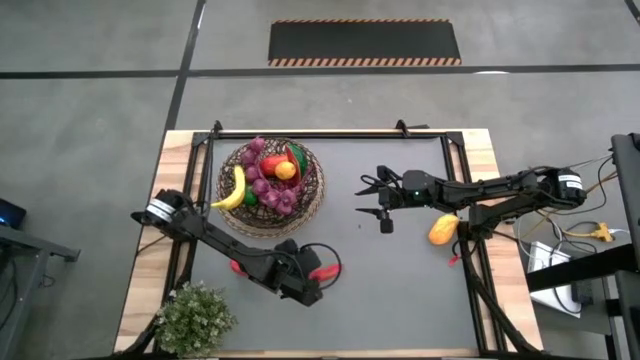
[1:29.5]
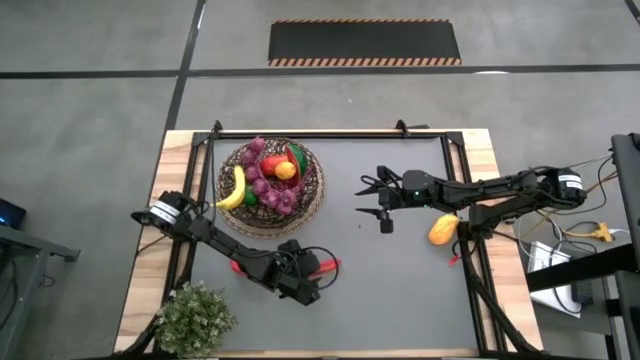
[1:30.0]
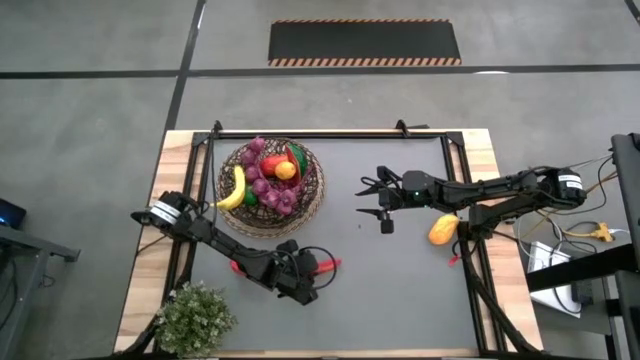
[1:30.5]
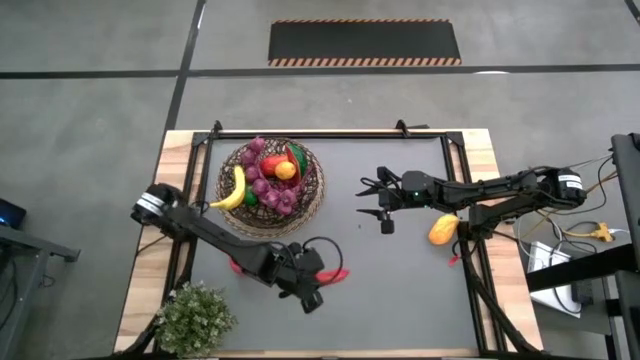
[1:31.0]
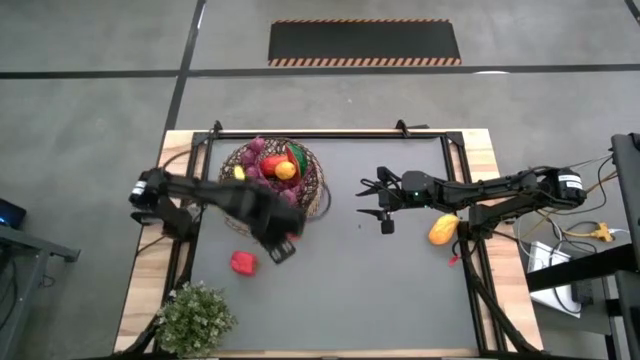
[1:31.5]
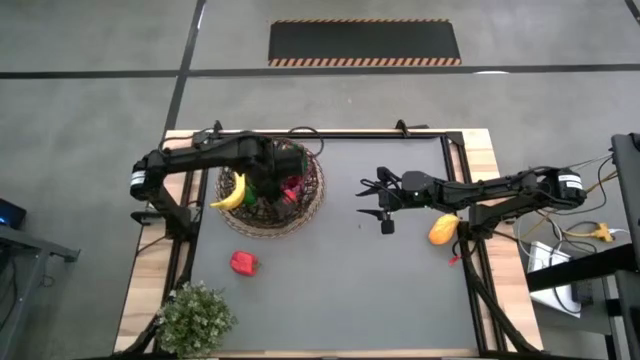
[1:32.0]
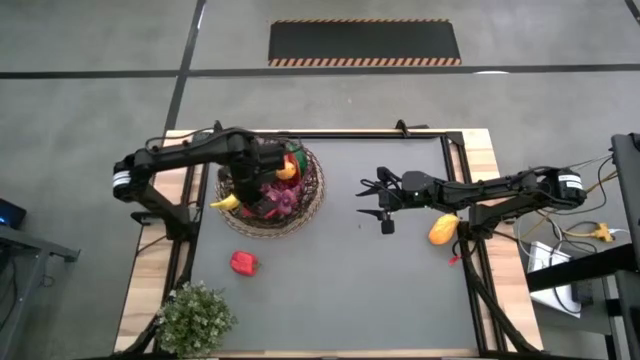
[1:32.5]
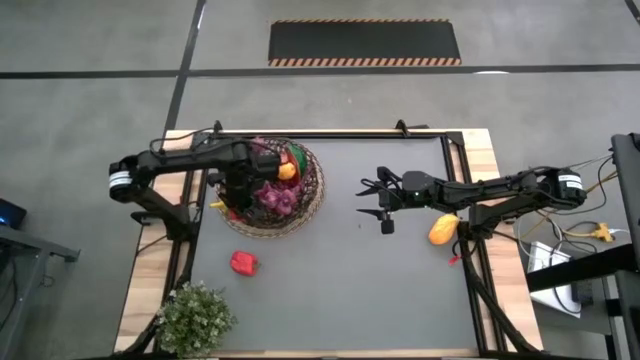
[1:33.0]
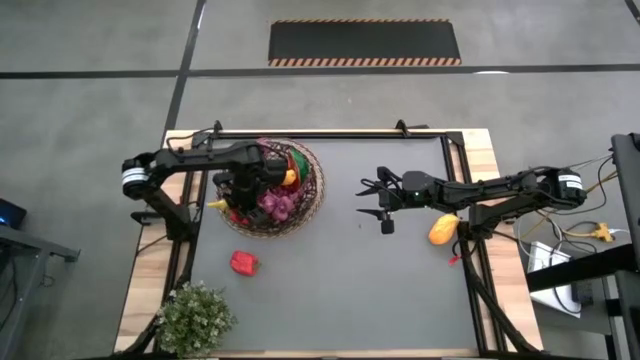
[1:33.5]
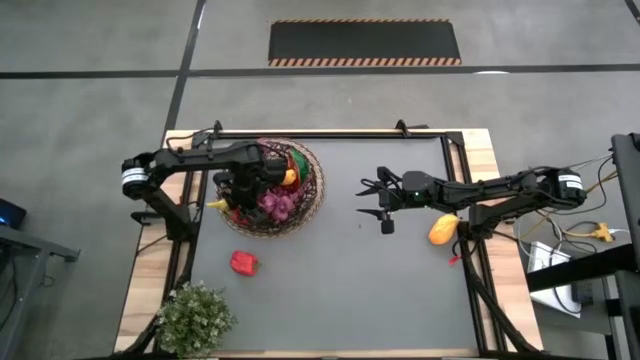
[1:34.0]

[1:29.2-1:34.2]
Task: Build produce basket
Put the red chili pepper into the wire basket

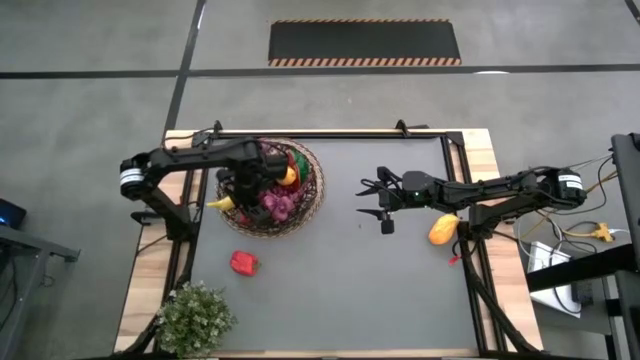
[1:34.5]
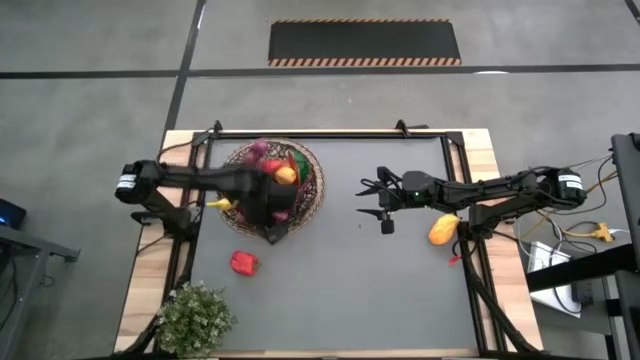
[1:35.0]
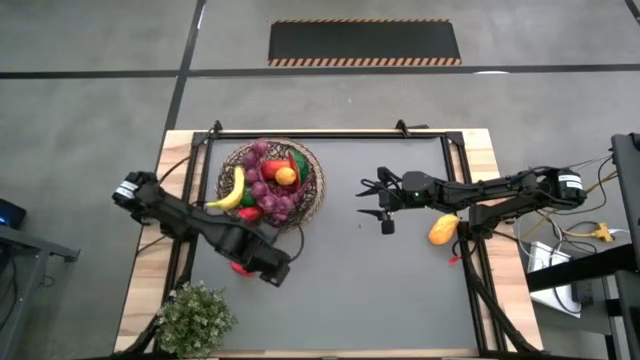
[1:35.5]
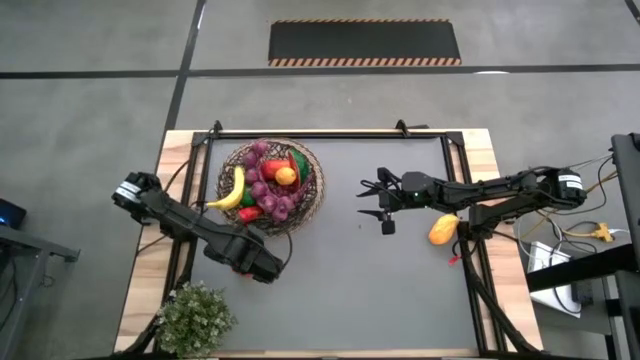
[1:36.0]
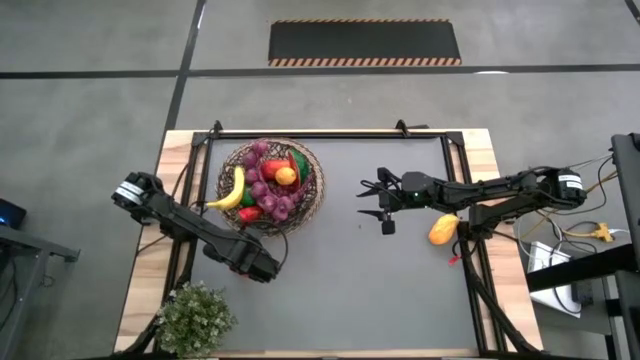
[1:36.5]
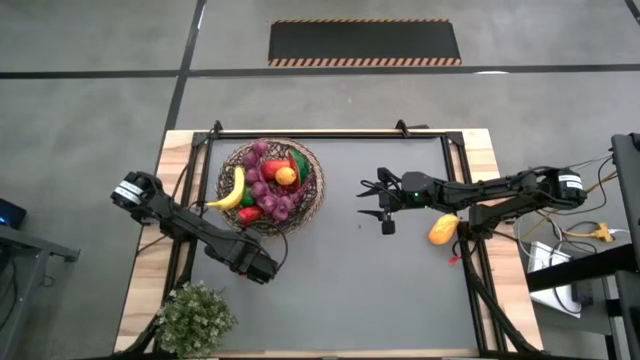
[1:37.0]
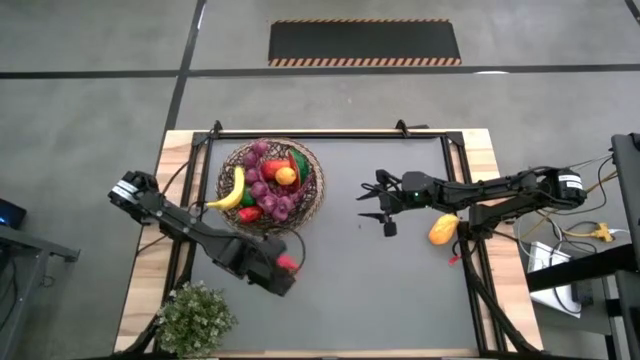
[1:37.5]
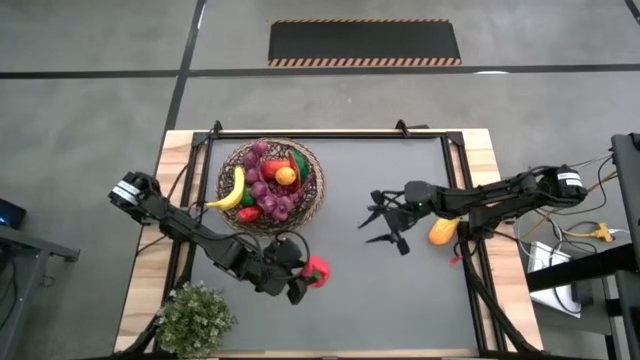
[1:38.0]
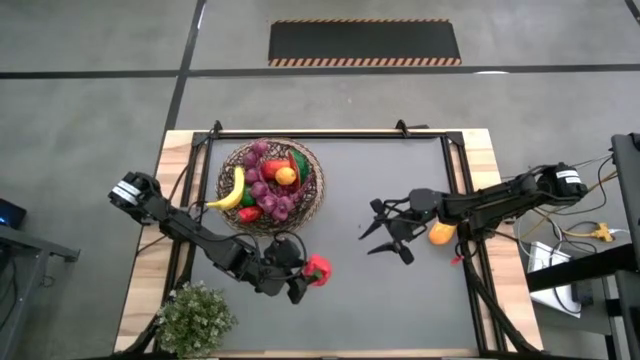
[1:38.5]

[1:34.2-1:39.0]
Put the bell pepper into the wire basket

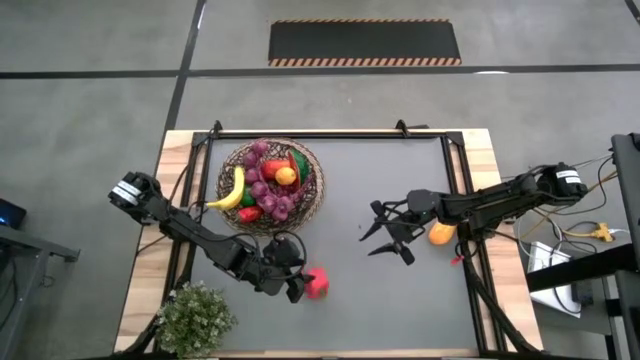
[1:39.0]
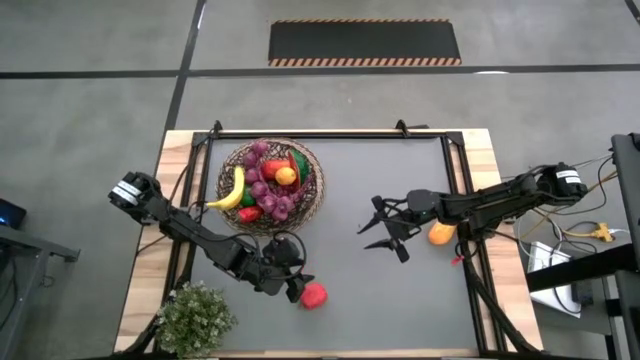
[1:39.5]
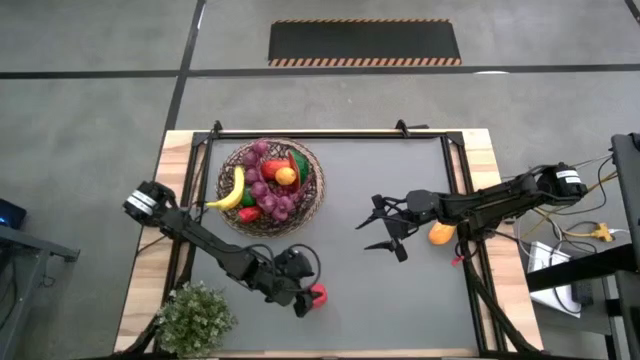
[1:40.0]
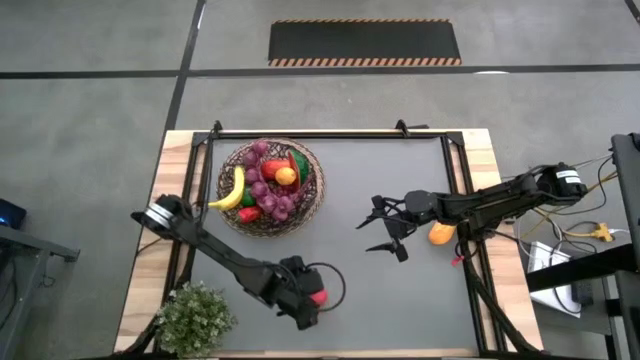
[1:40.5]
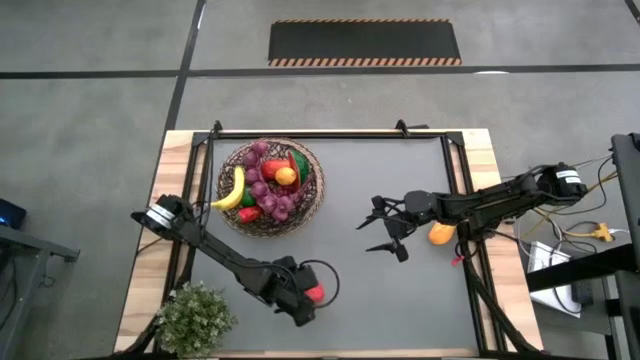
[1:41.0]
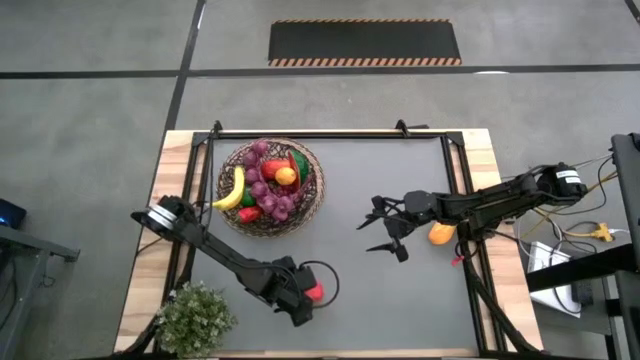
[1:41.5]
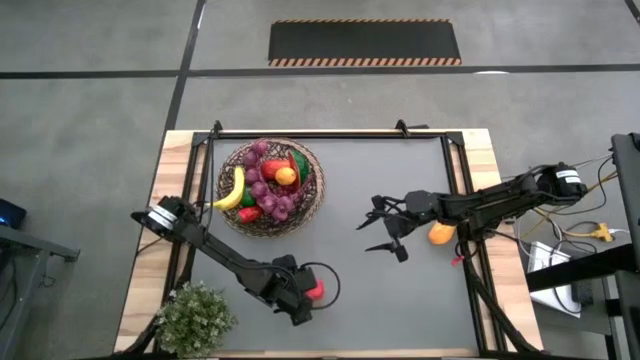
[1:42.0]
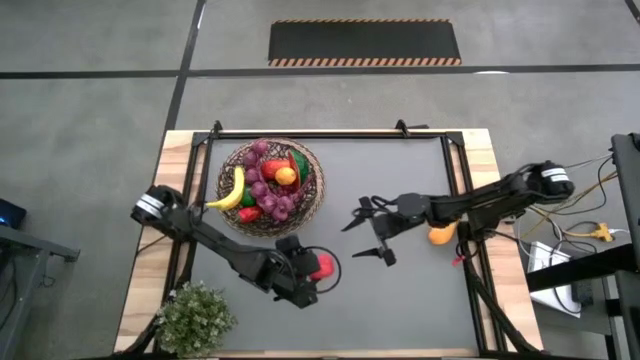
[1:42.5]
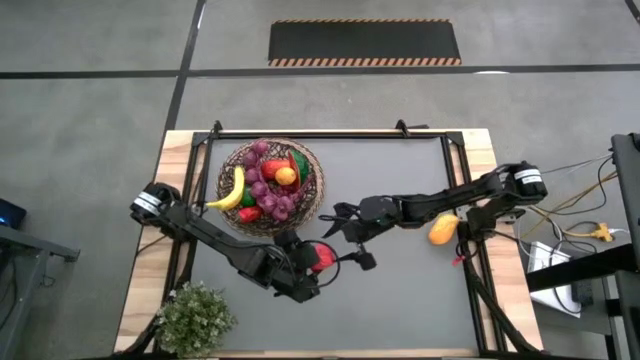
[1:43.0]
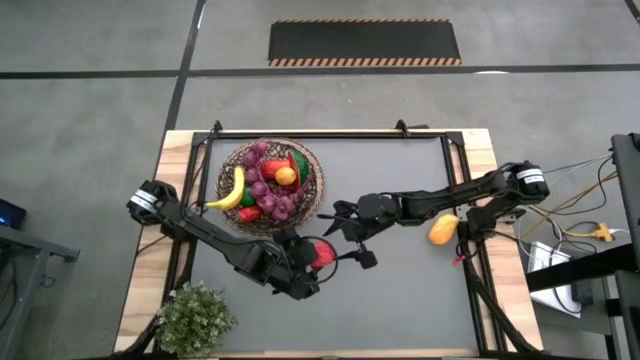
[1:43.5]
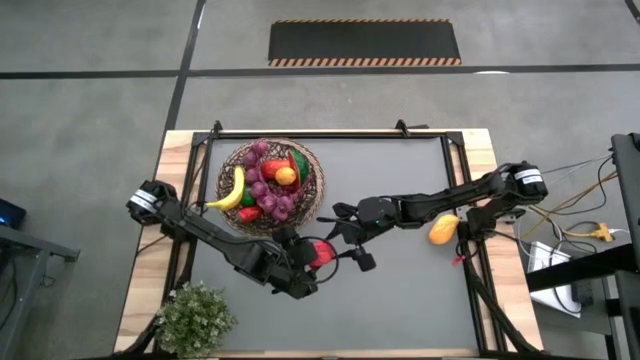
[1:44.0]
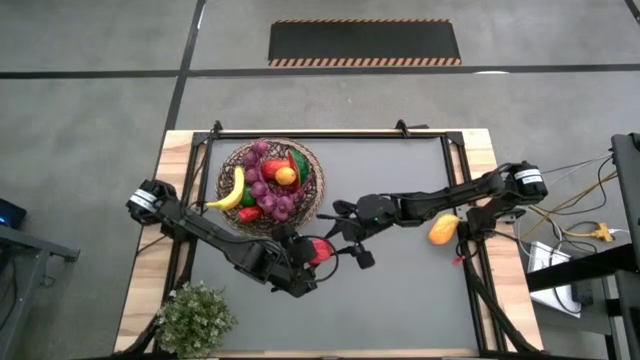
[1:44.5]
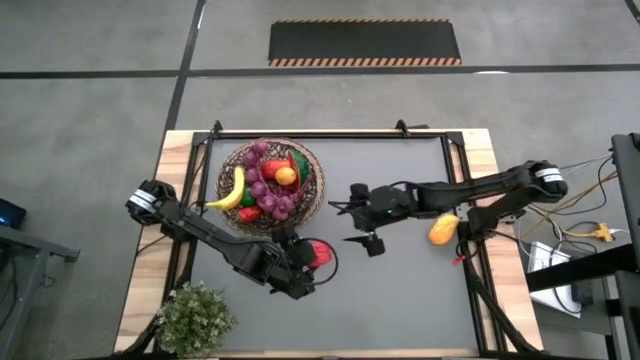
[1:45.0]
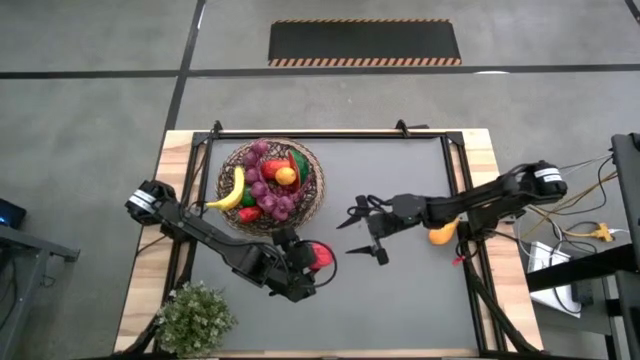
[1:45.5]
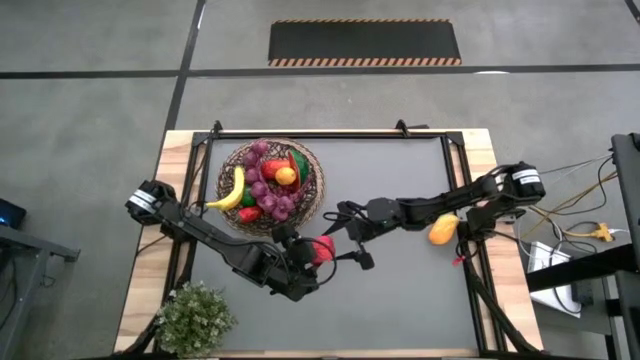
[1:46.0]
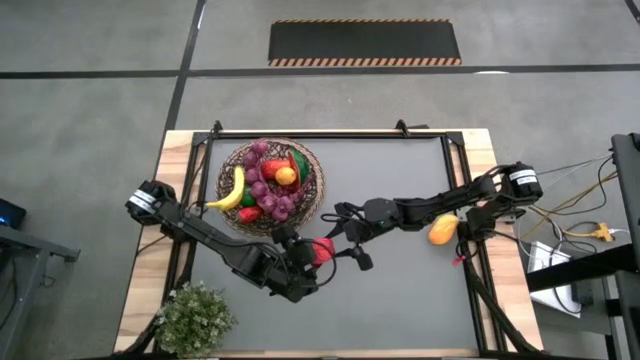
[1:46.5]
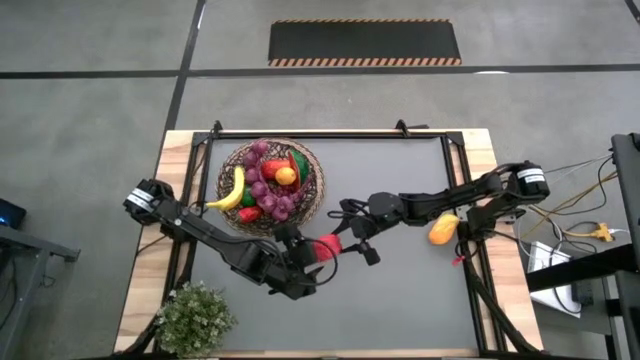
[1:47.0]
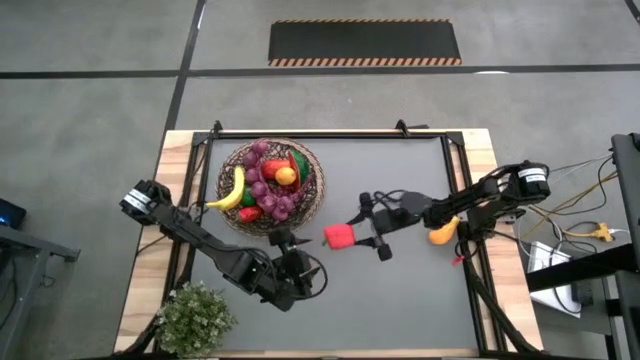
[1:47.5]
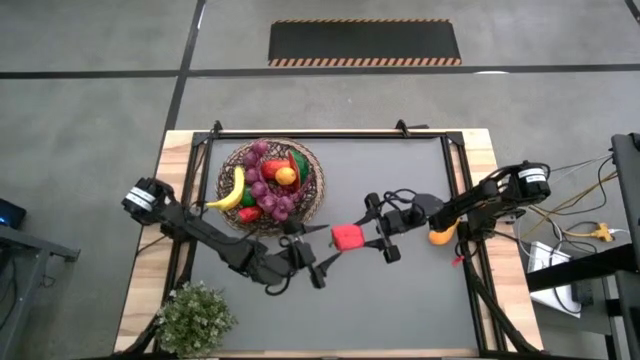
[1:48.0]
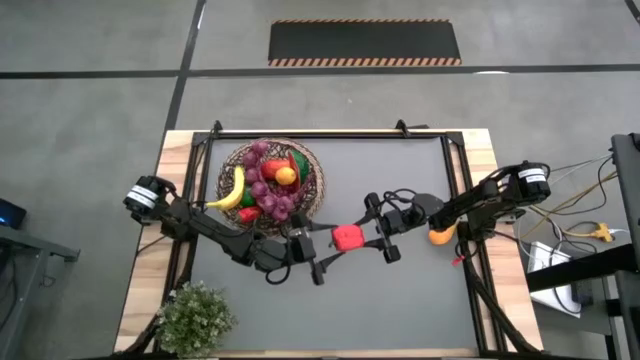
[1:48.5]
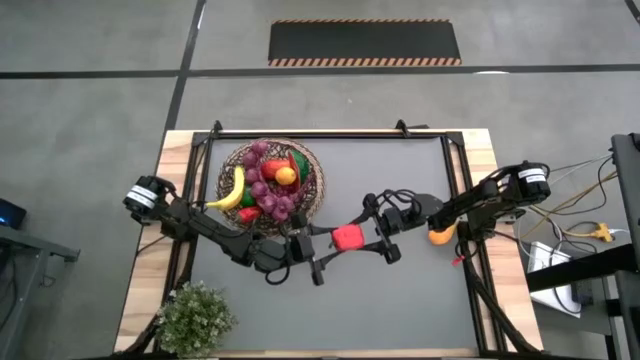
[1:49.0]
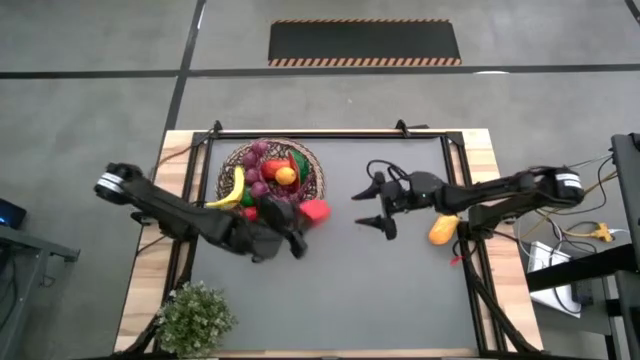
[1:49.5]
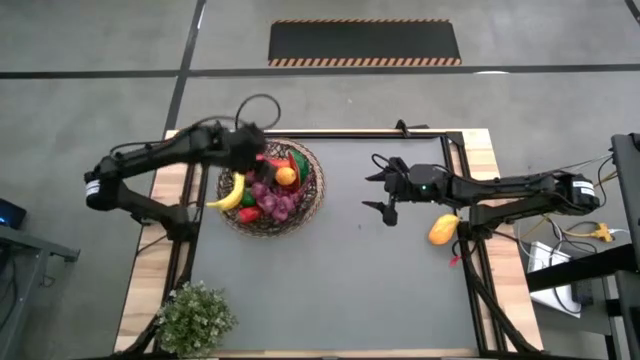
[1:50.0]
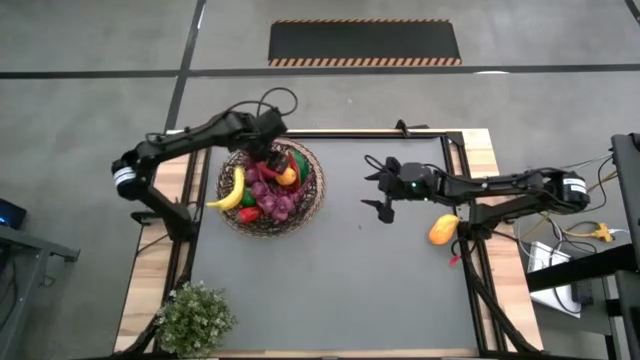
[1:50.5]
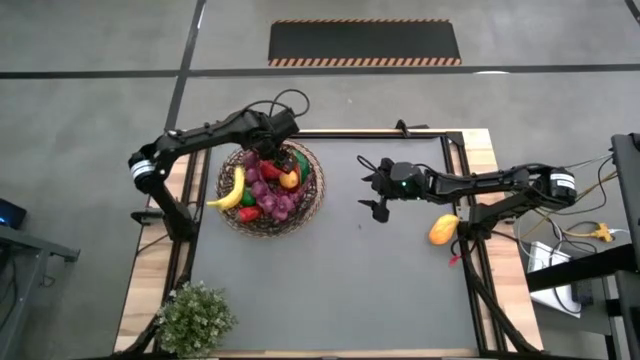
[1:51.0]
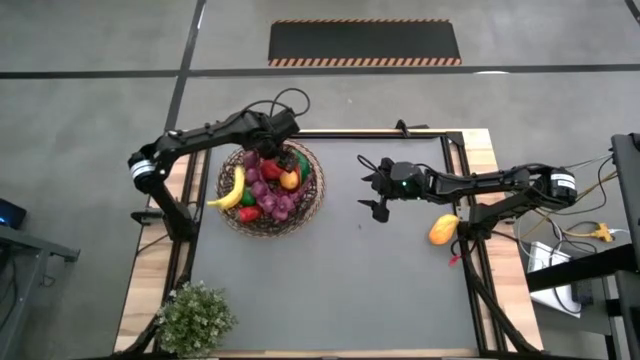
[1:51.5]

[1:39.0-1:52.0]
Put the bell pepper into the wire basket
